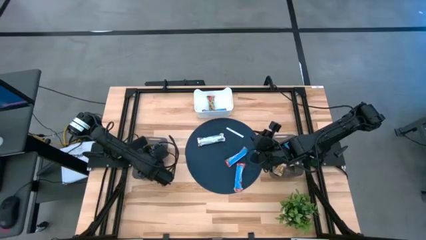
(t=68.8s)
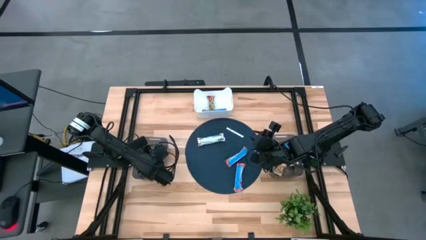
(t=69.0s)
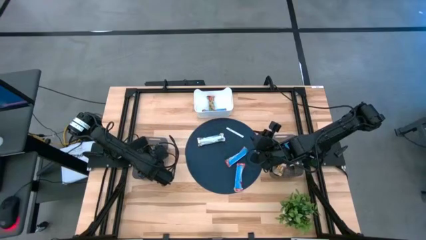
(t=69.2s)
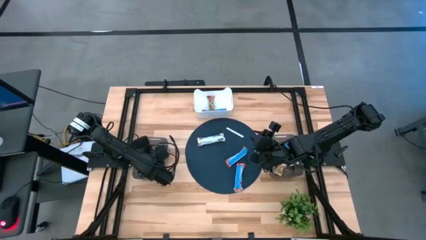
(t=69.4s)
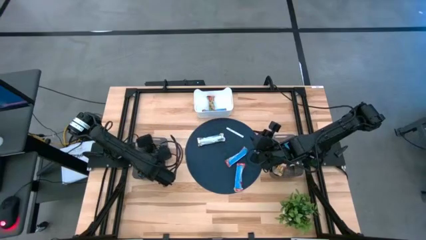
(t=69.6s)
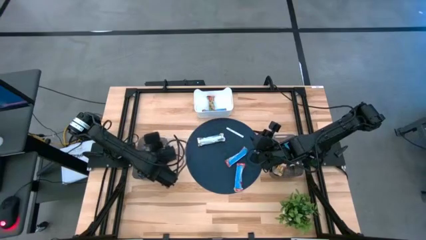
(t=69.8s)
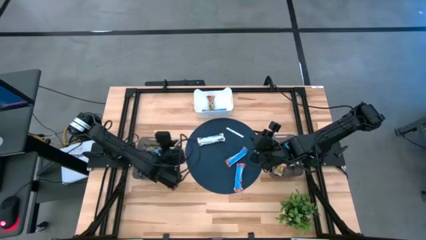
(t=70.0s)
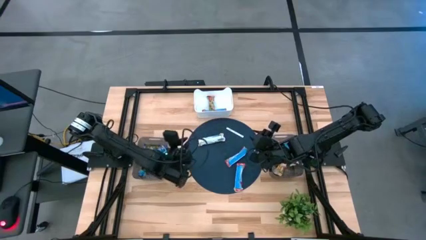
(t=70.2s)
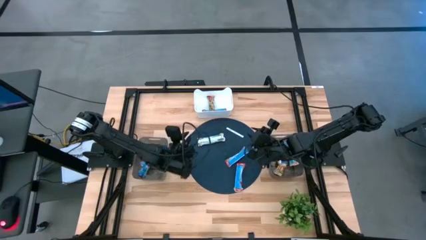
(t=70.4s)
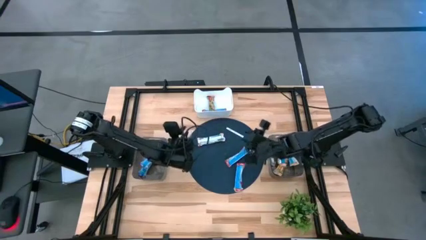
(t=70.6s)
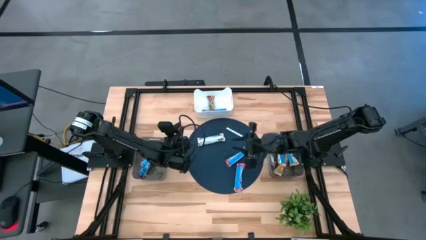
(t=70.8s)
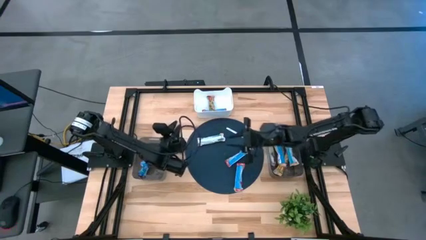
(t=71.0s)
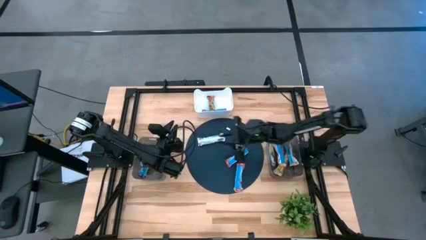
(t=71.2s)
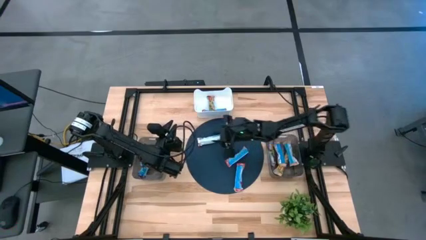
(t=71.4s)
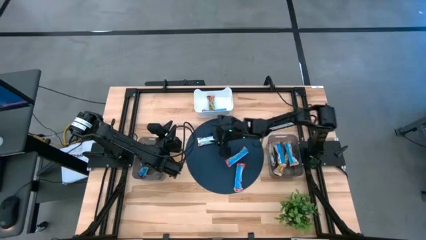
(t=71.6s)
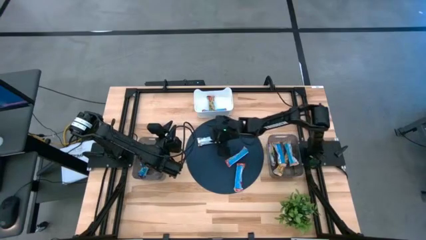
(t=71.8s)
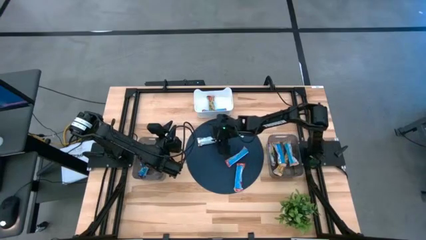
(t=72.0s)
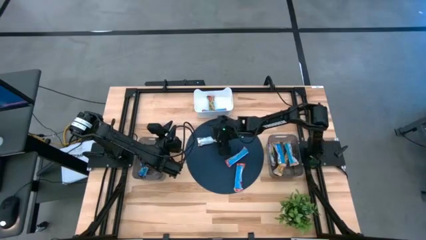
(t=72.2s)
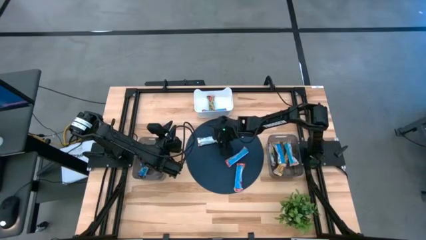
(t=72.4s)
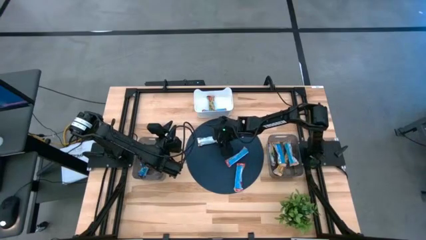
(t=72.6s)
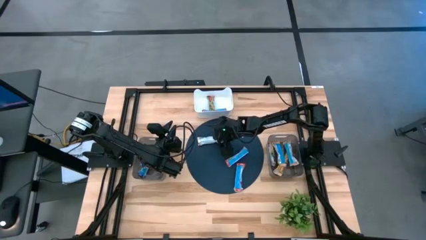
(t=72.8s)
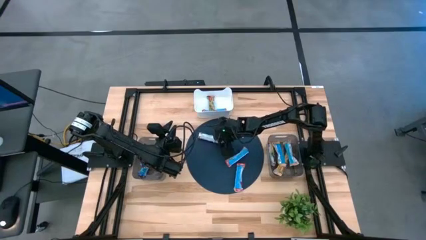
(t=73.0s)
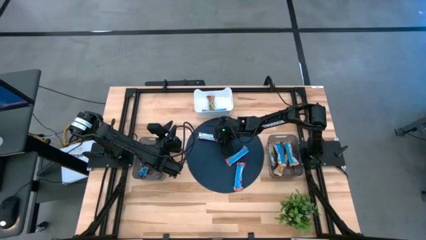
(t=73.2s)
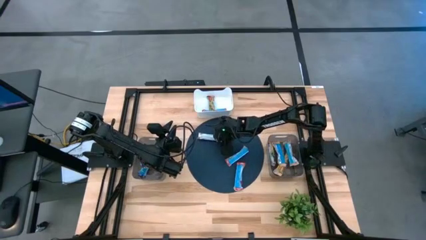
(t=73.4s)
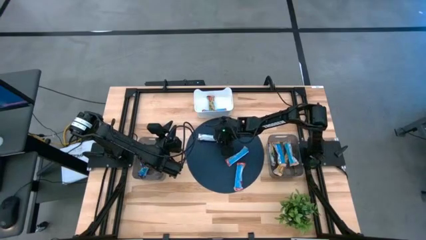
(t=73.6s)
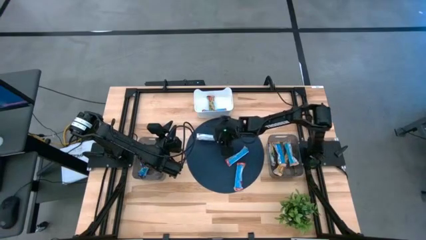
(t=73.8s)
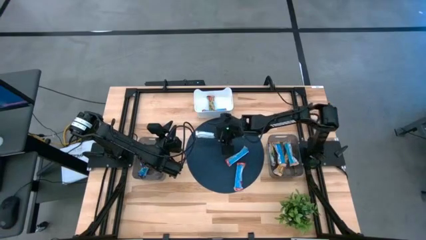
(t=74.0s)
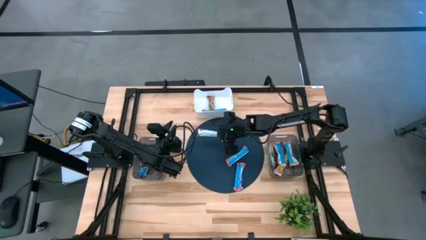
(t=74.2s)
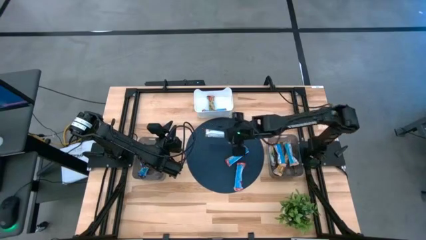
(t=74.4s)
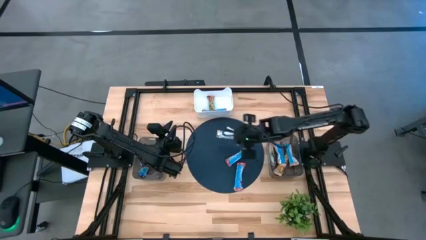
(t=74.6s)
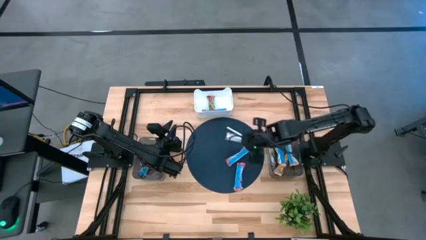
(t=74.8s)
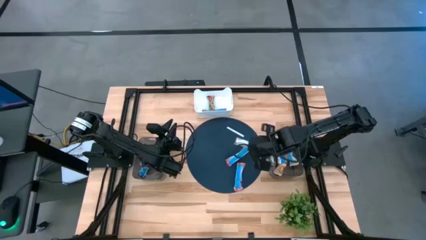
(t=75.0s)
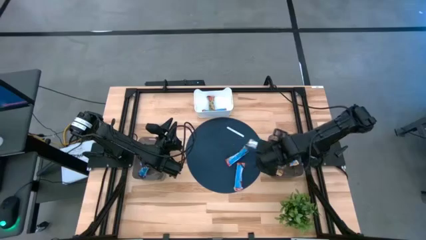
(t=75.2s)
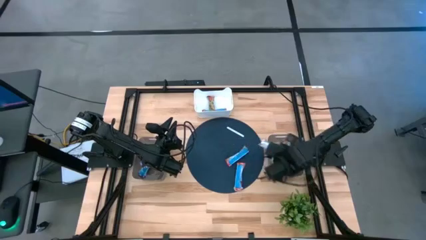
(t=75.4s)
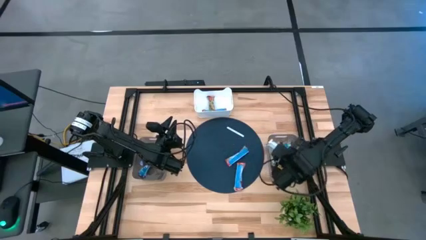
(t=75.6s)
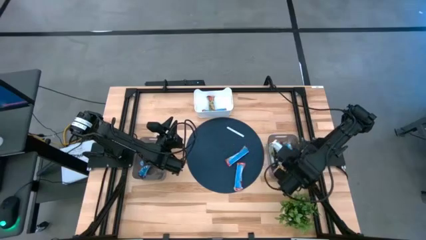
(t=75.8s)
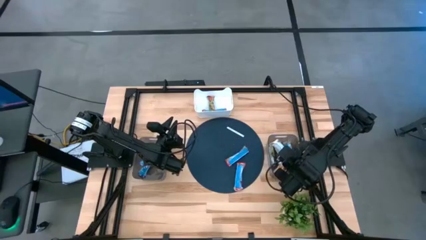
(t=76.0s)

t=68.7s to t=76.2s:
Task: Pick and place Granola Bars by type
Put the orange granola bar into the right black bin

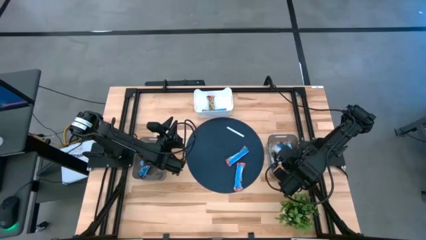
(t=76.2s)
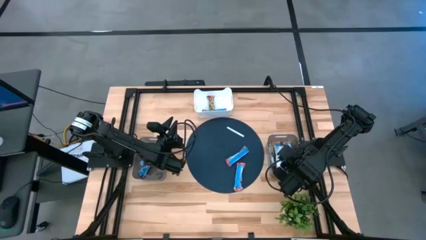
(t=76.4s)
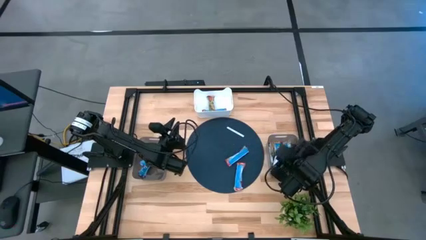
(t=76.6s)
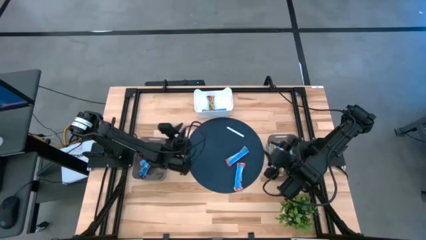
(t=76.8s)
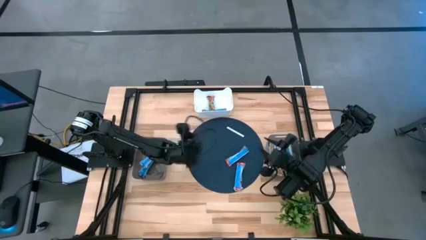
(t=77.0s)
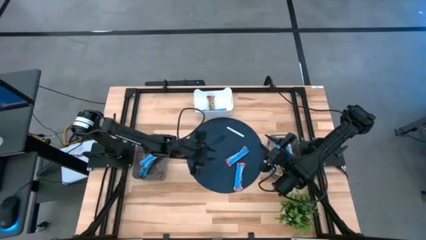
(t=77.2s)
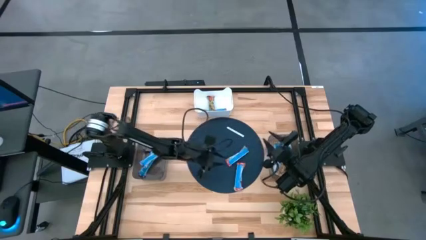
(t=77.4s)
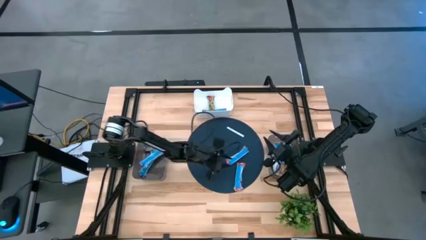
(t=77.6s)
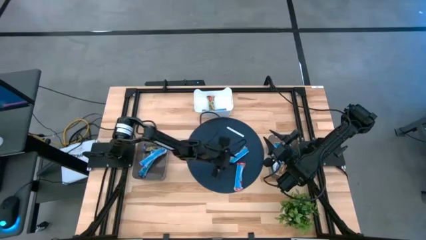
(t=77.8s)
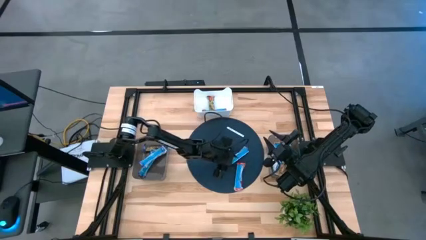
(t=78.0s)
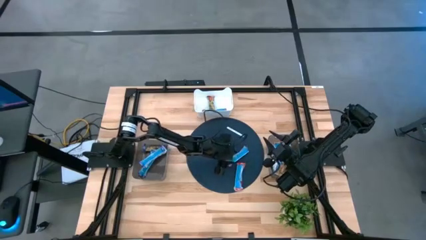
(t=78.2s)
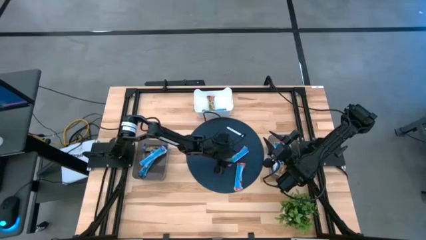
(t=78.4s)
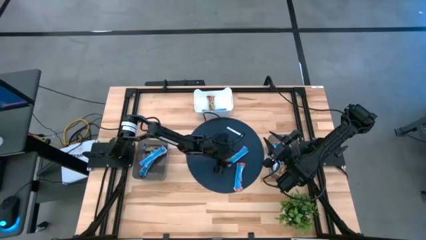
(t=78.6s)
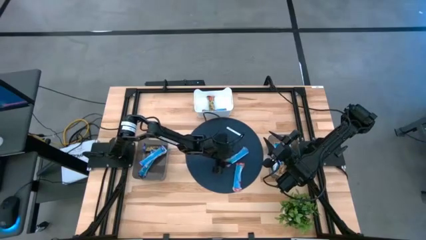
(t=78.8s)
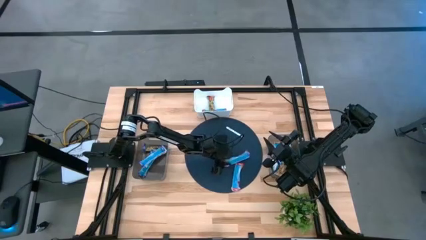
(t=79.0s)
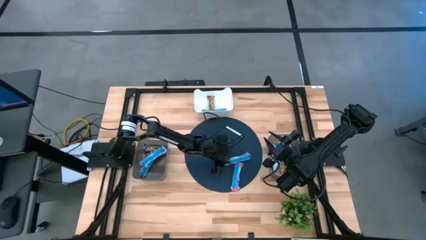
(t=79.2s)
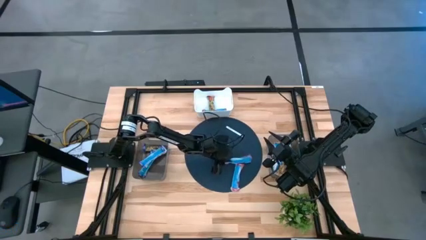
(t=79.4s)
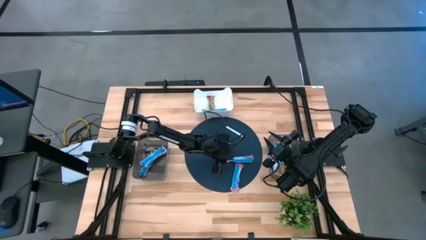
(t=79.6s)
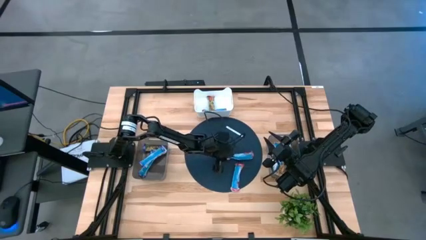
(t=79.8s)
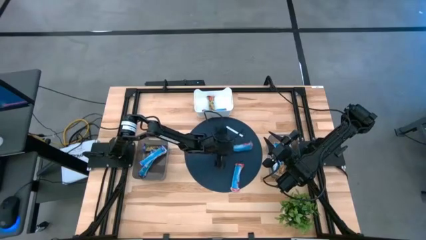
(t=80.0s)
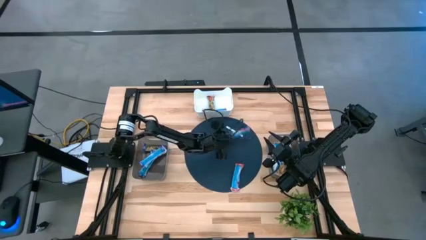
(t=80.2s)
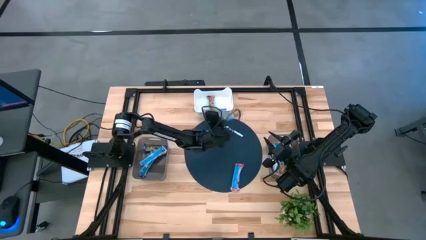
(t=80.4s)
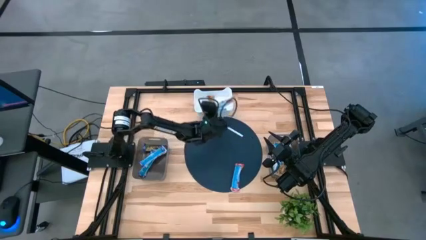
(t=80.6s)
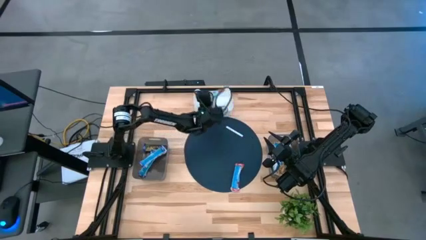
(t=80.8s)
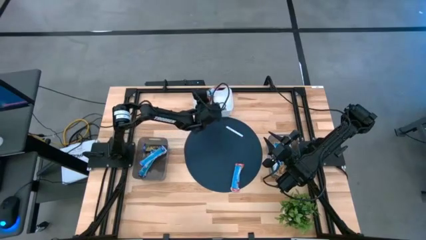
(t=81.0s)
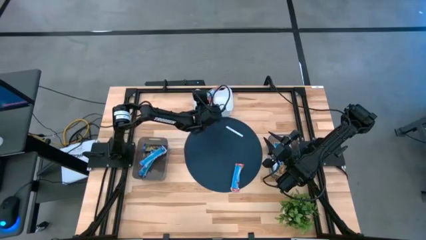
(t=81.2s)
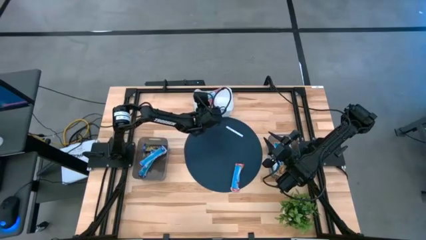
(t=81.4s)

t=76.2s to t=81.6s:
Put the red granola bar into the white bin

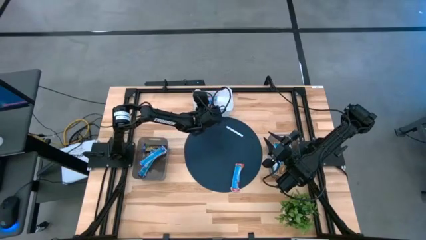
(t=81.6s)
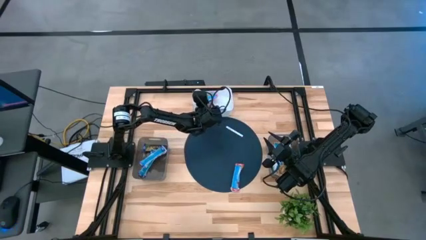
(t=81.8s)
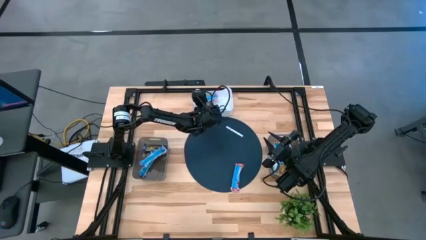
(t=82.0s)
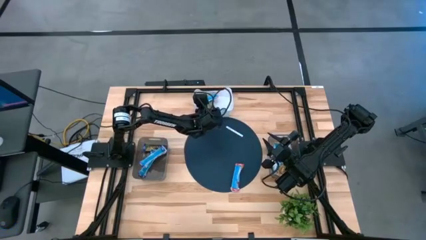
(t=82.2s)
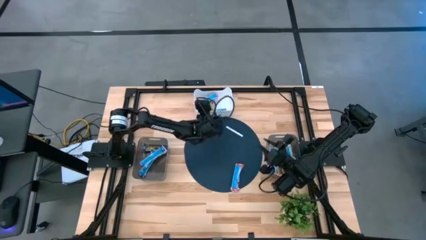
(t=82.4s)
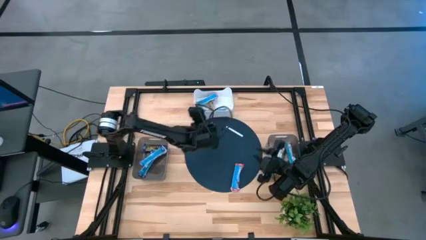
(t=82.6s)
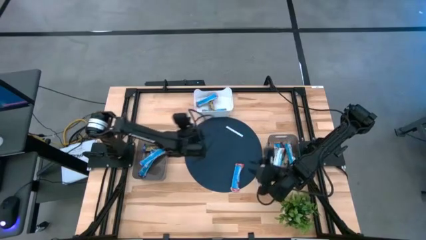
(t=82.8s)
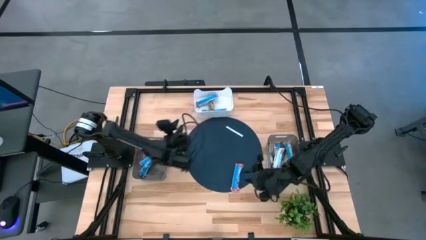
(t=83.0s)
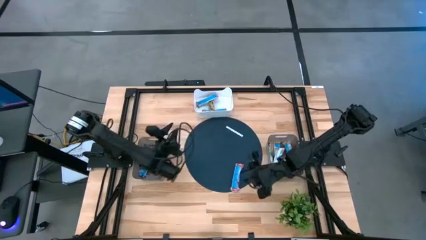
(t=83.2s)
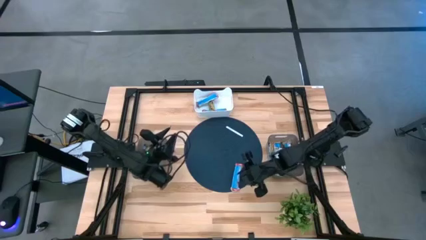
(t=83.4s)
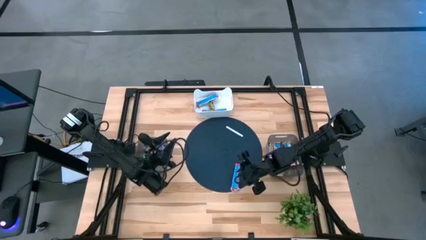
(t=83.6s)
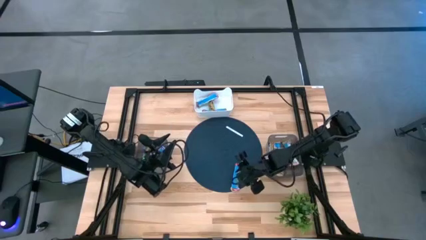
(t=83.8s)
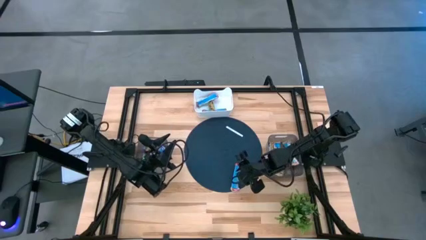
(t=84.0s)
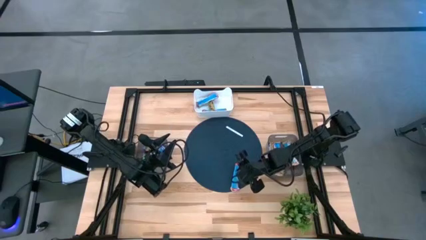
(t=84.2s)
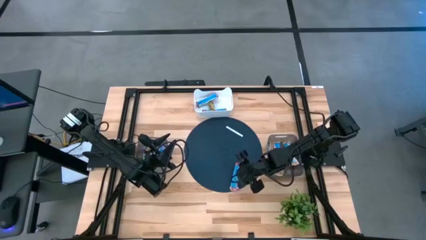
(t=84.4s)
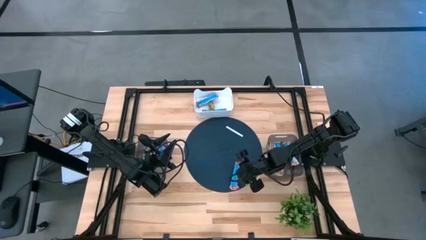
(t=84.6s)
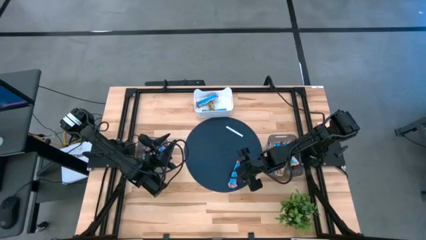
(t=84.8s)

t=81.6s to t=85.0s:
Put the red granola bar into the white bin
